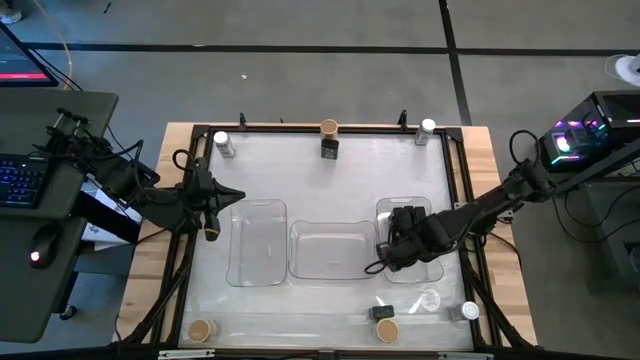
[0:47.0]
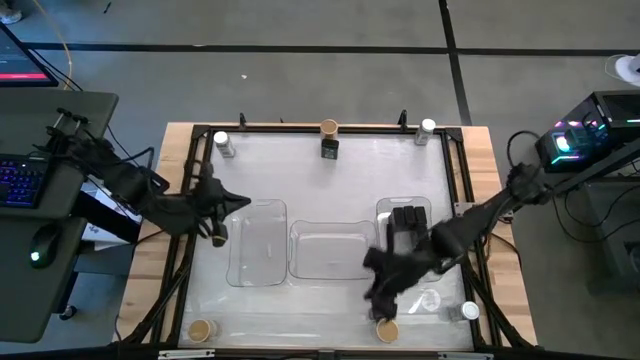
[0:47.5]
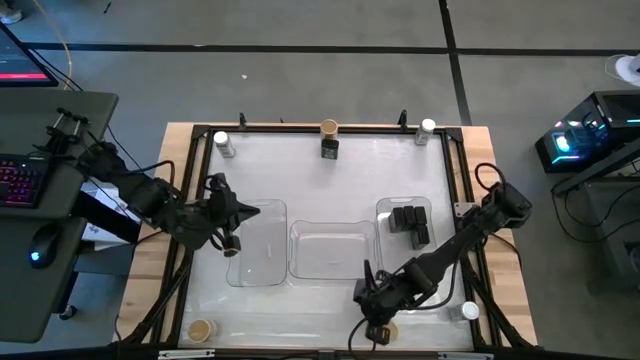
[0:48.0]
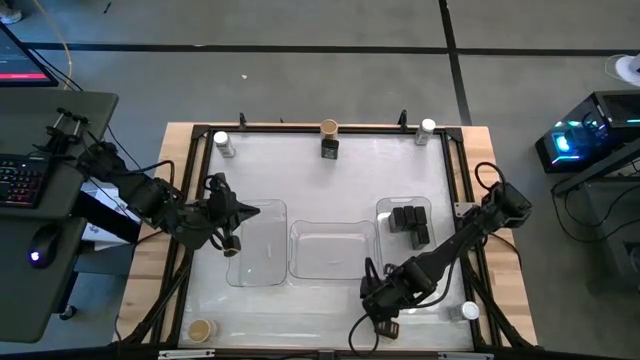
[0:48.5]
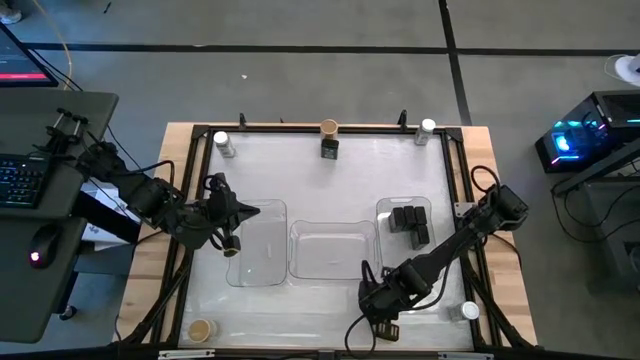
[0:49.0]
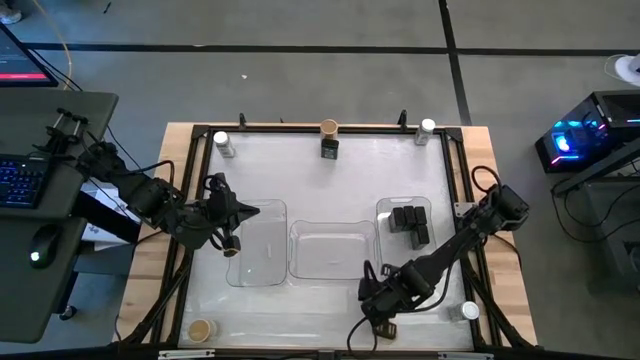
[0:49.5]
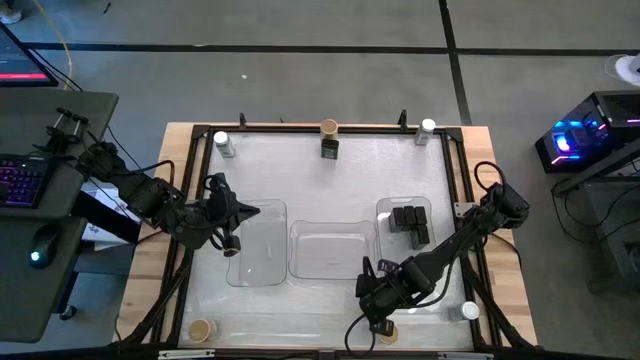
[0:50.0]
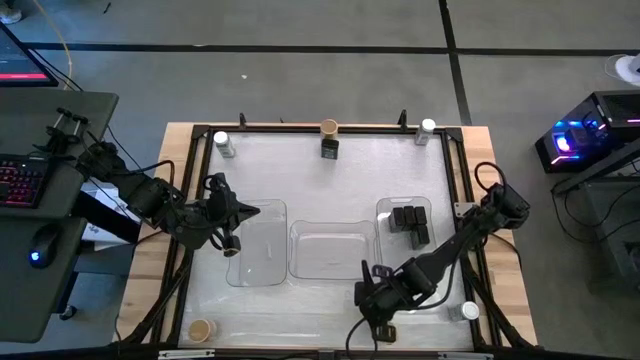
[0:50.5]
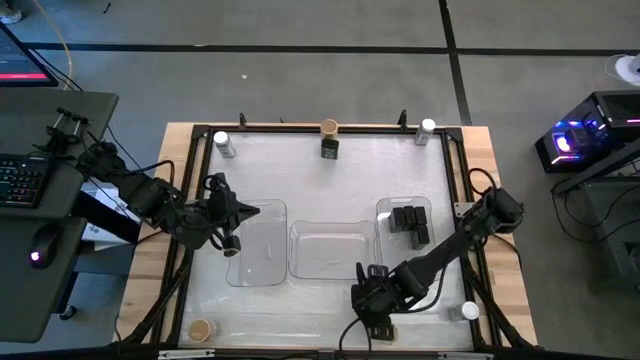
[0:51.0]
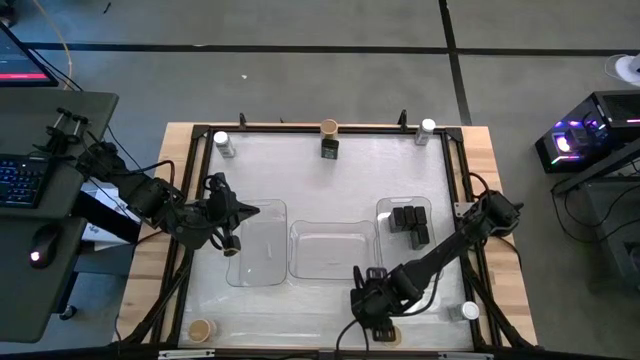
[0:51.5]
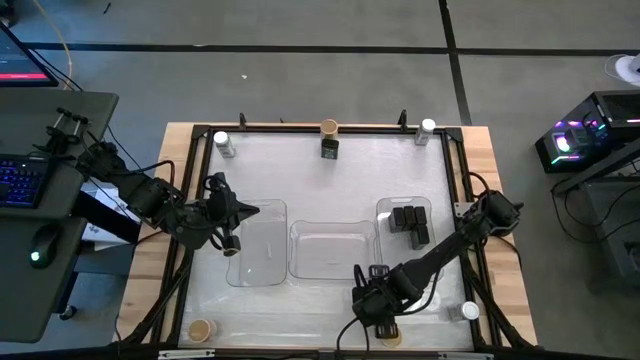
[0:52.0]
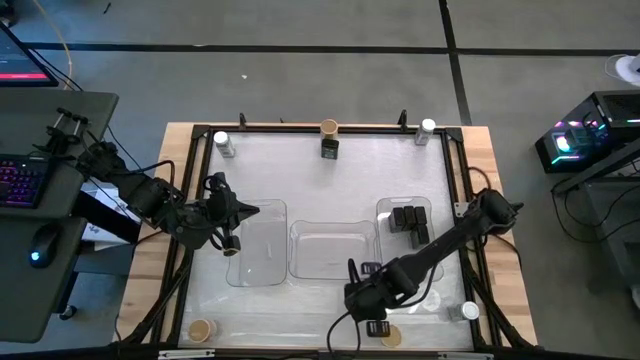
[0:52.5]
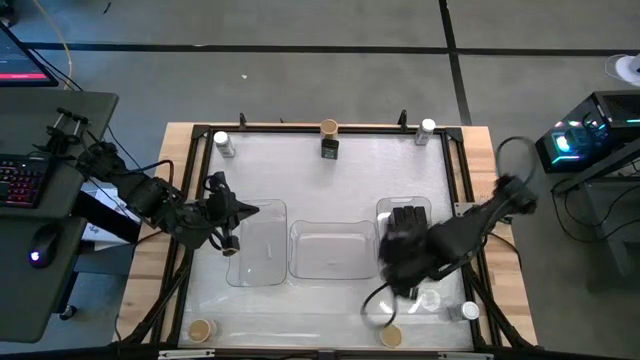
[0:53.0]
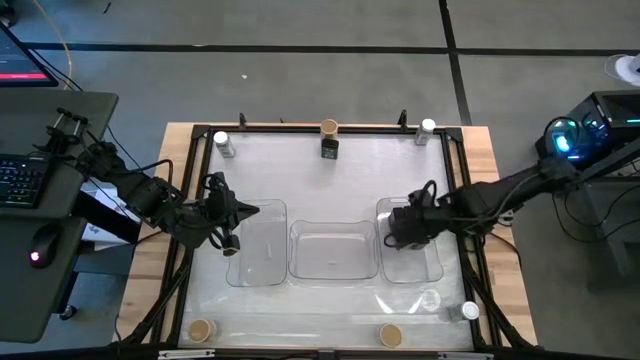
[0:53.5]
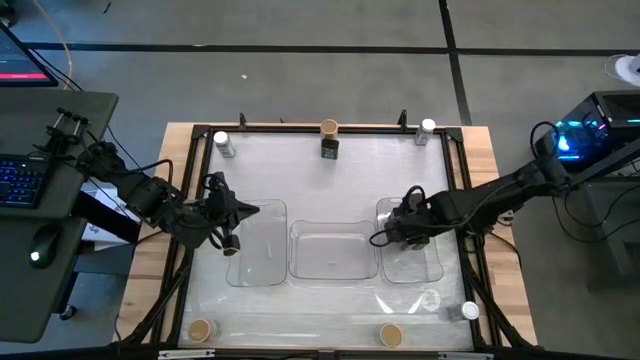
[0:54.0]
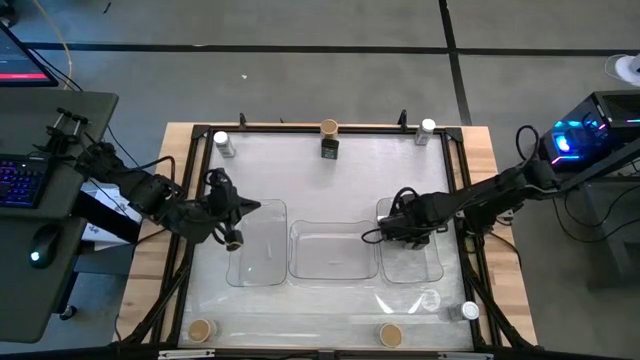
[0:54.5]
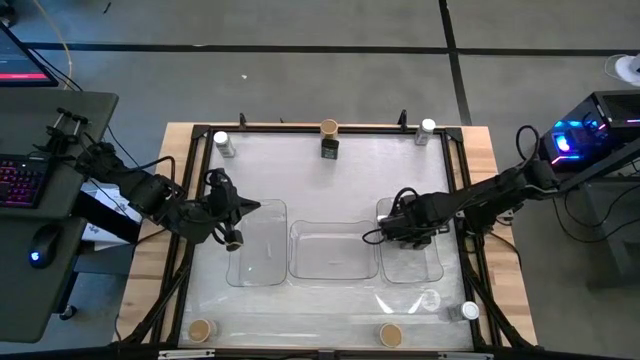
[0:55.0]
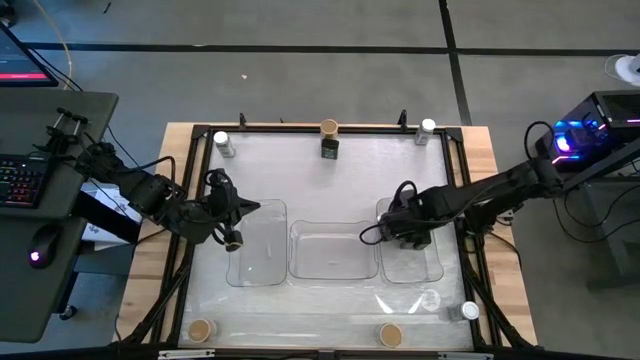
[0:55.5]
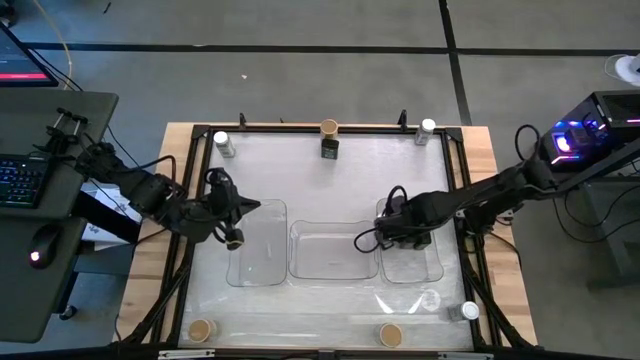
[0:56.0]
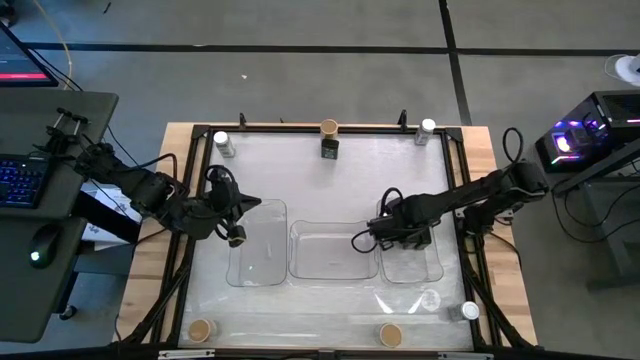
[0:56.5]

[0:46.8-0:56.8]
Task: Sort spices by type
Put the black seasoning can into the right transparent bin aligned with the other black seasoning cans

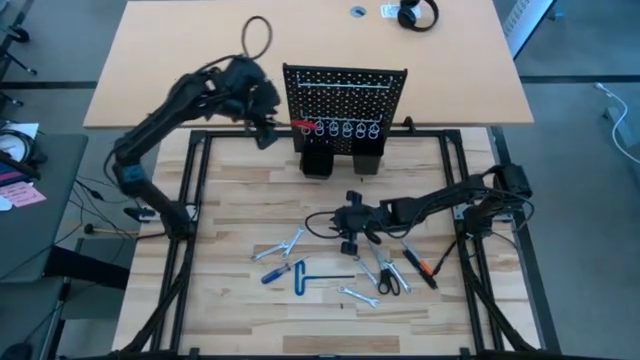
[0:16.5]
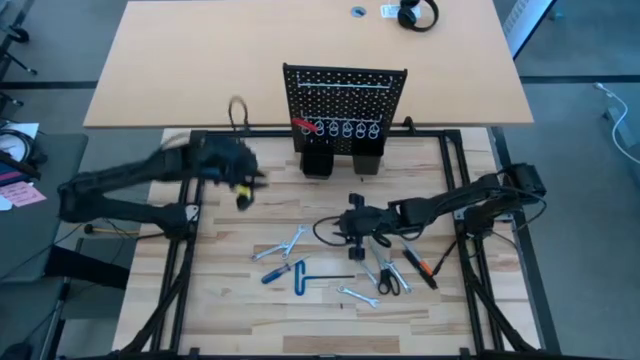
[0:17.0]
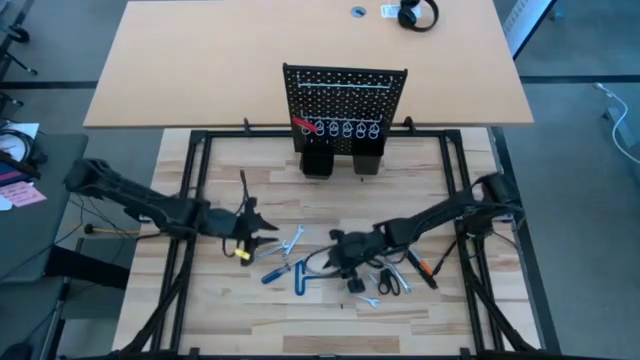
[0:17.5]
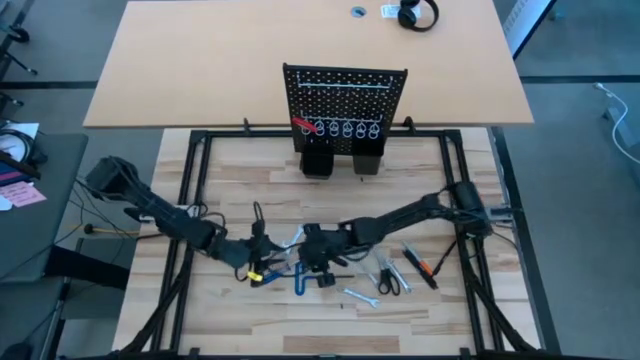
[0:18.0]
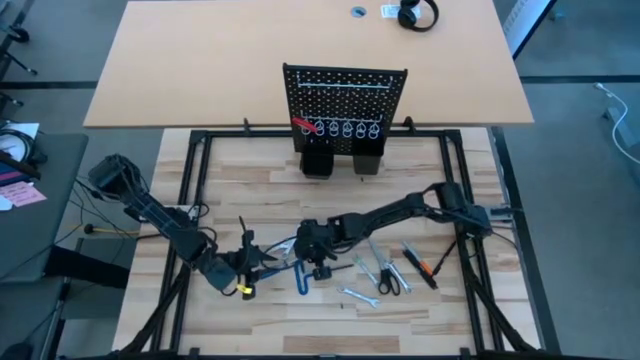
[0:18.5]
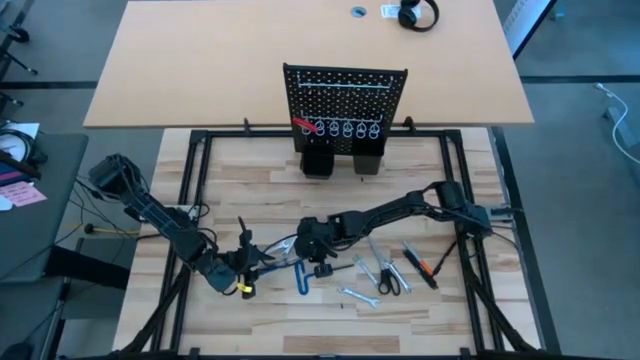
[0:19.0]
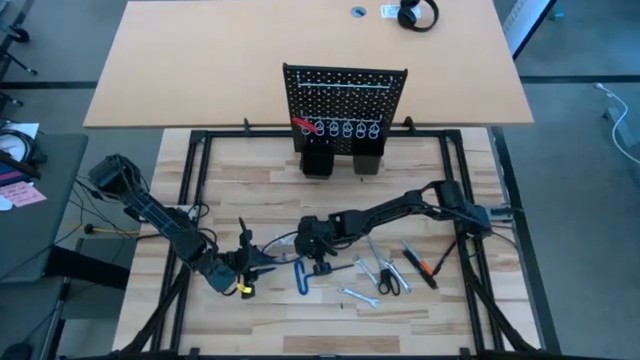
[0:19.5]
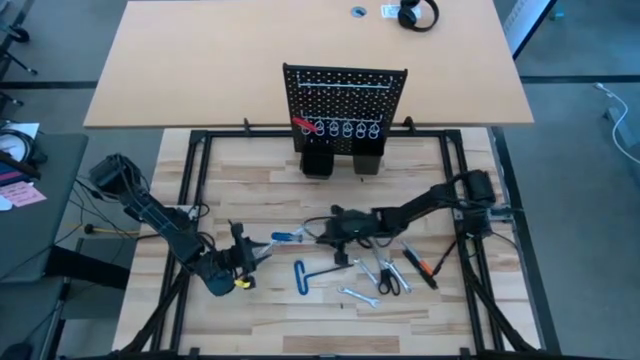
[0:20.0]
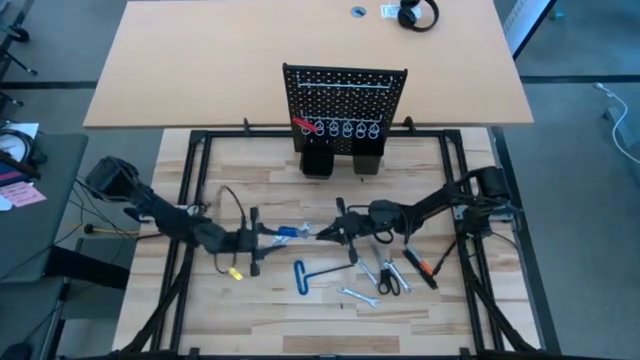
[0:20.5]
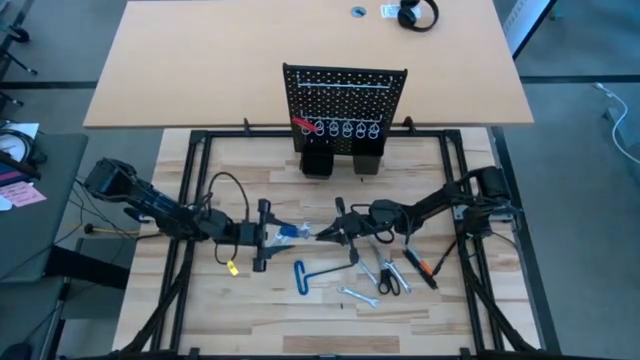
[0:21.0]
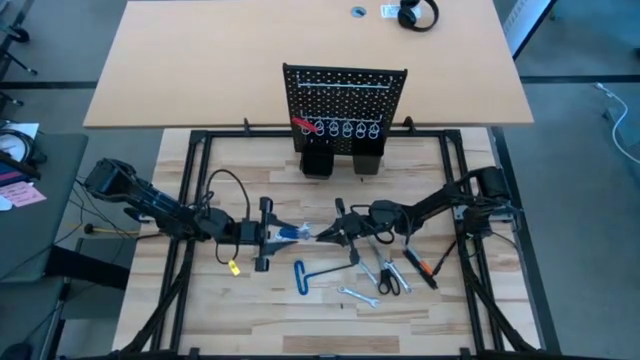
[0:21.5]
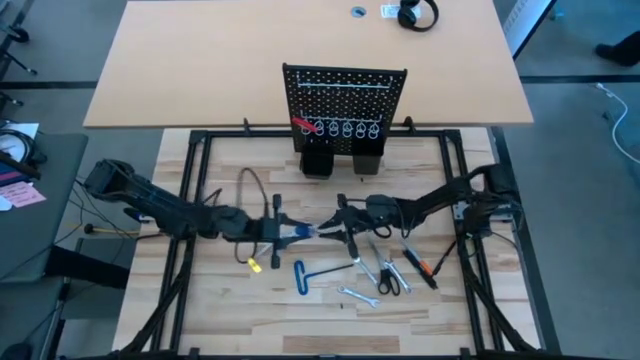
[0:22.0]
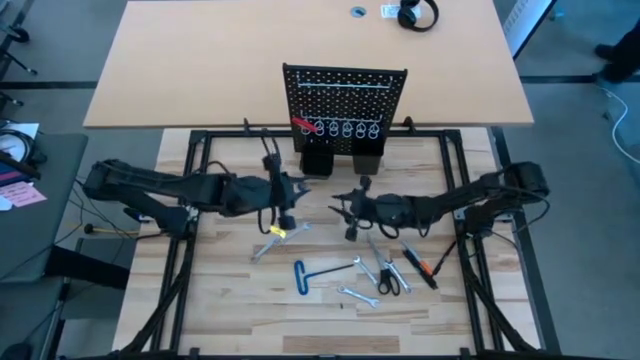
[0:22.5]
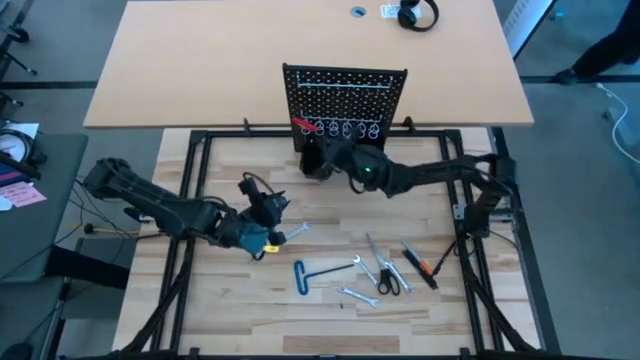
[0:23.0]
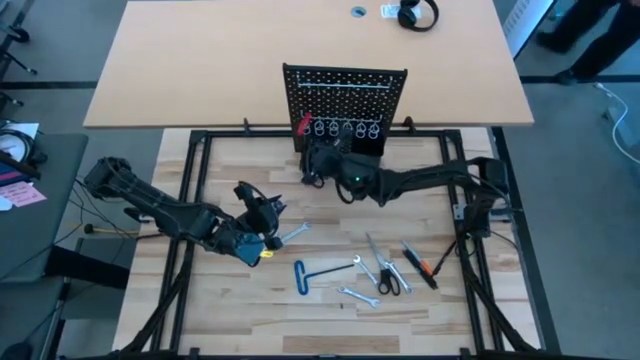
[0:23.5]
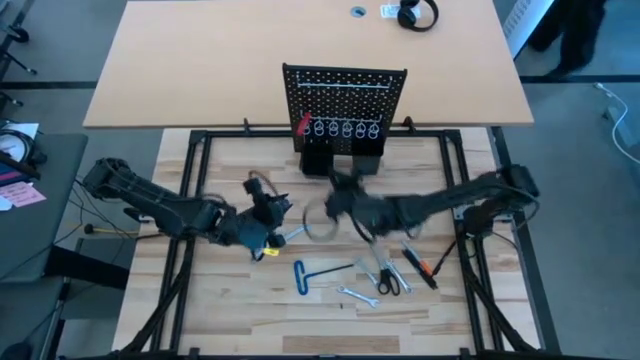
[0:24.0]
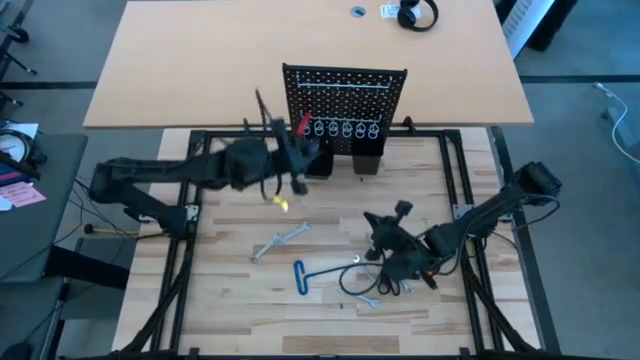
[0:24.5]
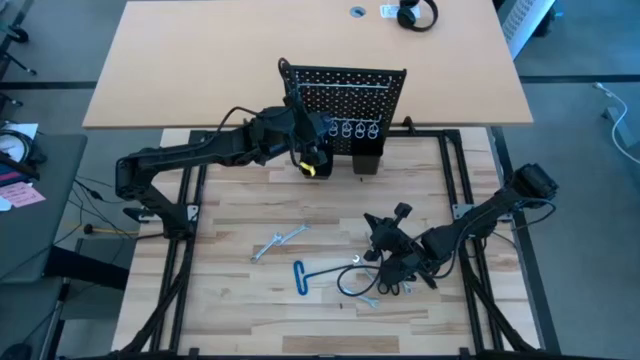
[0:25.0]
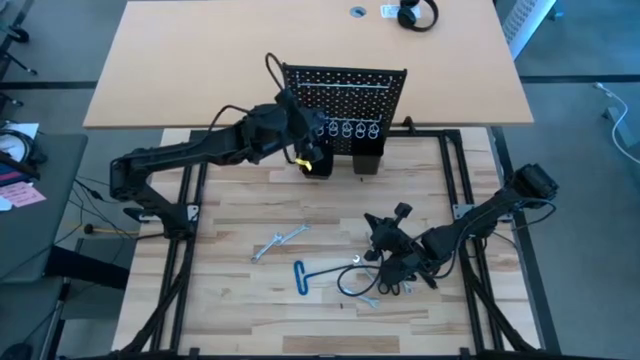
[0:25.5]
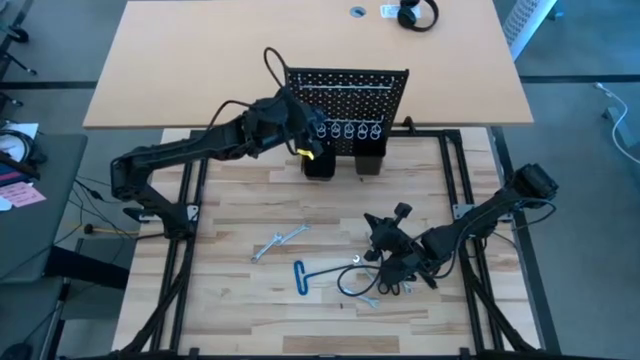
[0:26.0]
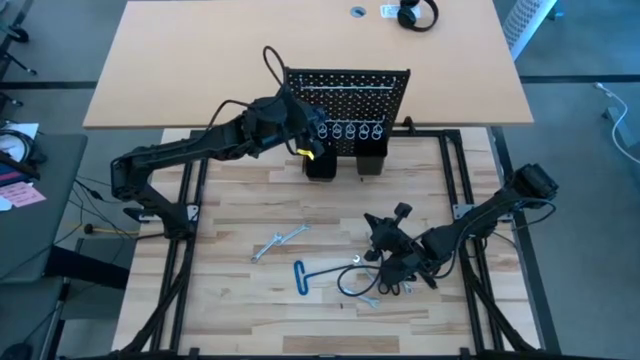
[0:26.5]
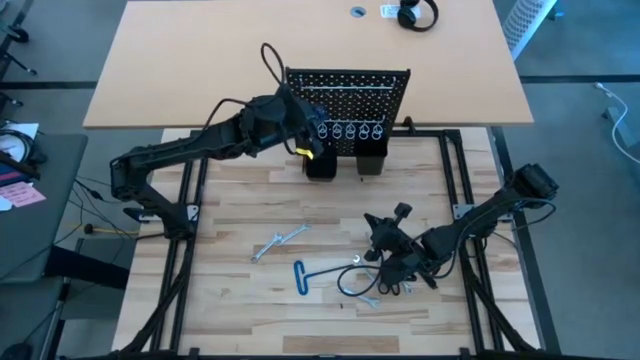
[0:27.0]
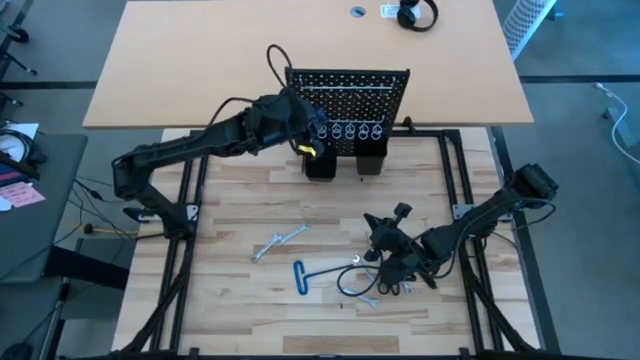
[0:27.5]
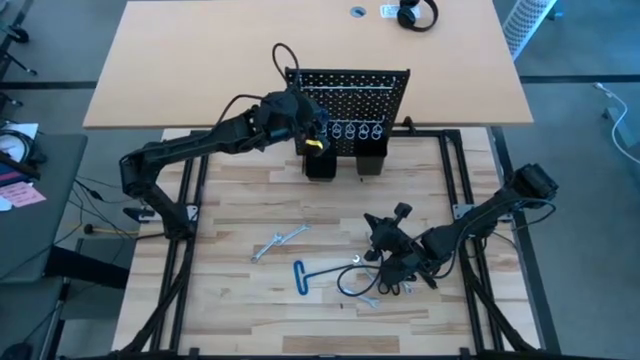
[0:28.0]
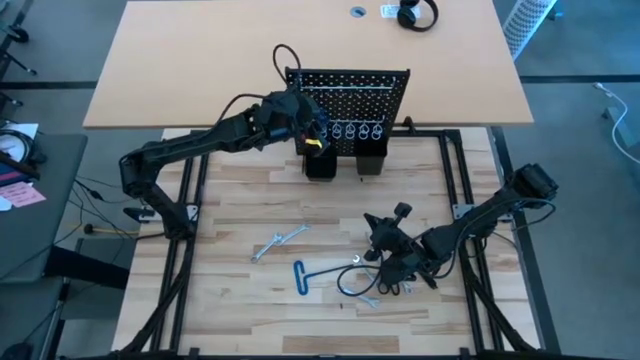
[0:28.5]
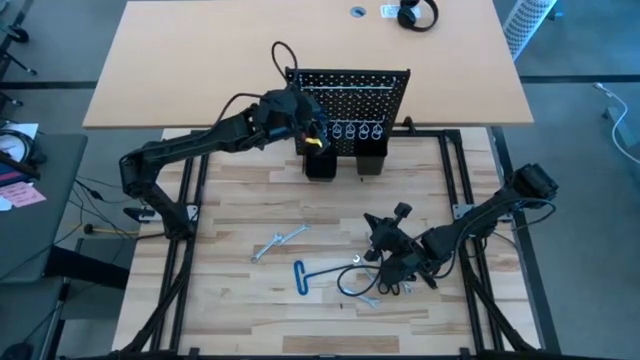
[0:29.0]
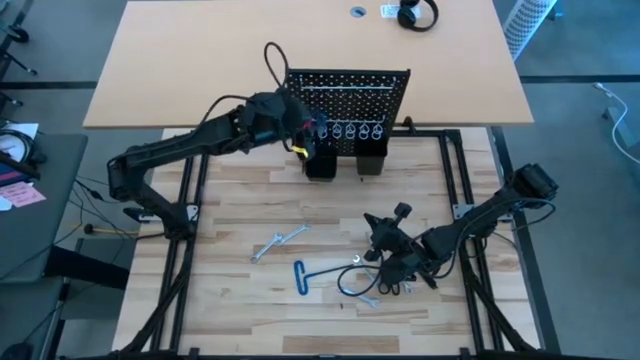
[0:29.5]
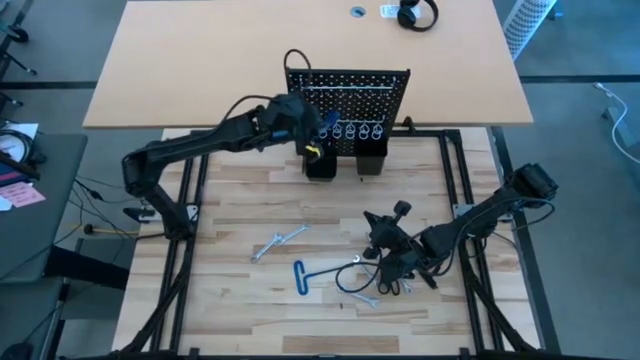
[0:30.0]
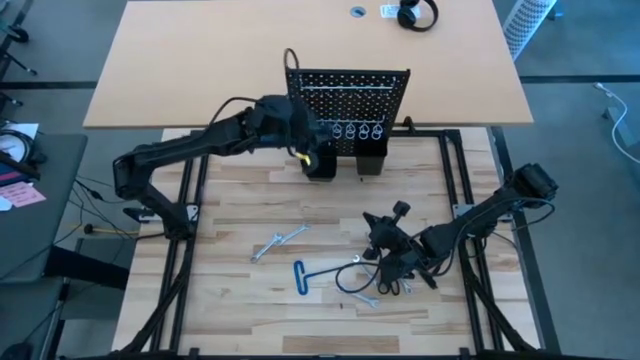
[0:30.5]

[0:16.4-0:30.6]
Task: Hang tools onto peg board
Hang the blue screwdriver on the pegboard
